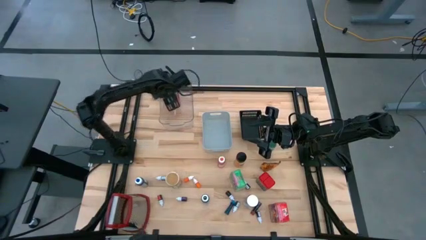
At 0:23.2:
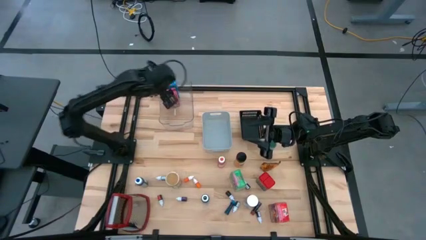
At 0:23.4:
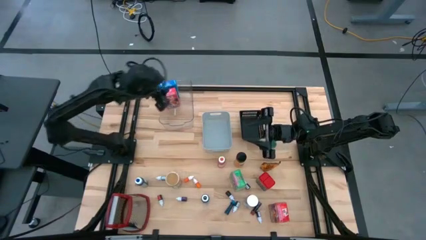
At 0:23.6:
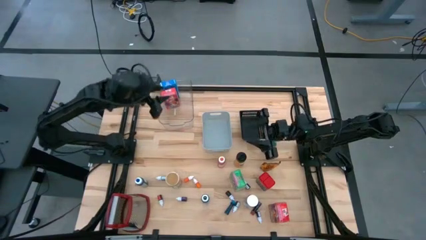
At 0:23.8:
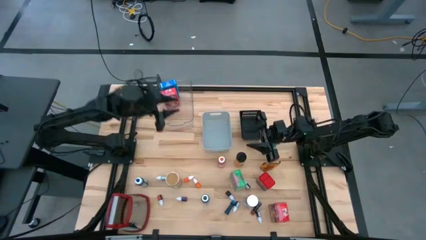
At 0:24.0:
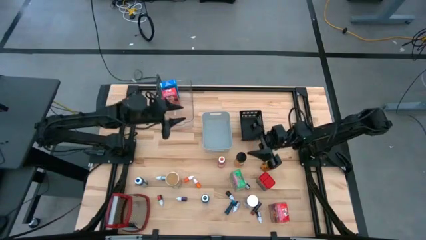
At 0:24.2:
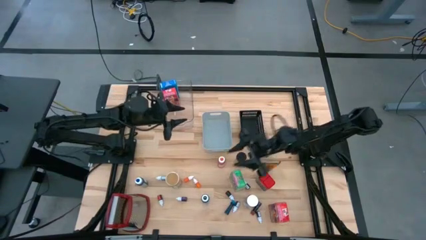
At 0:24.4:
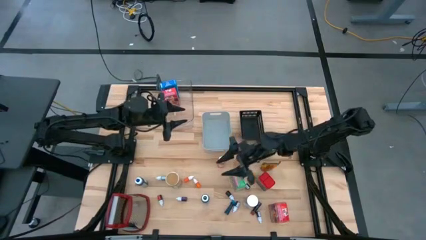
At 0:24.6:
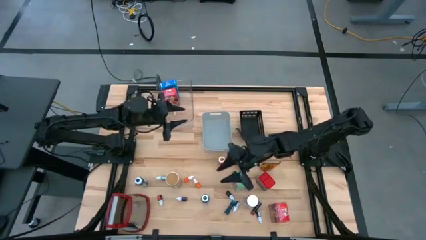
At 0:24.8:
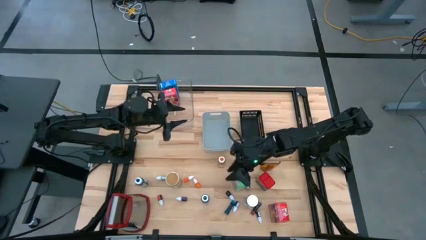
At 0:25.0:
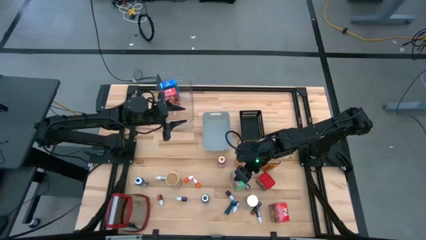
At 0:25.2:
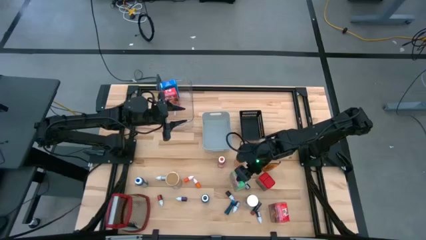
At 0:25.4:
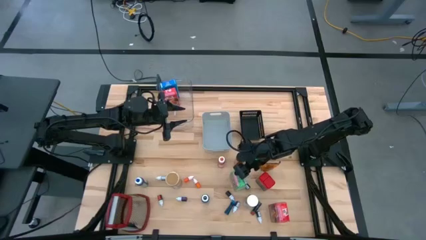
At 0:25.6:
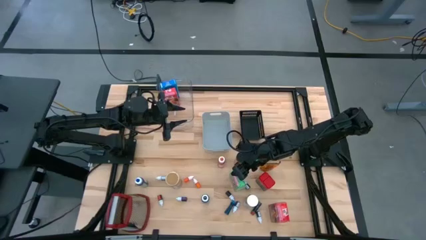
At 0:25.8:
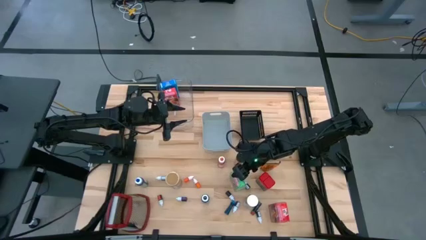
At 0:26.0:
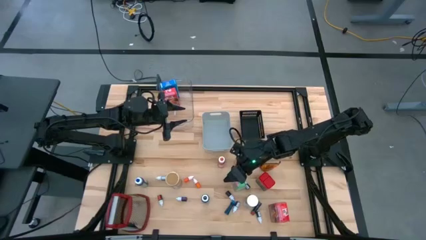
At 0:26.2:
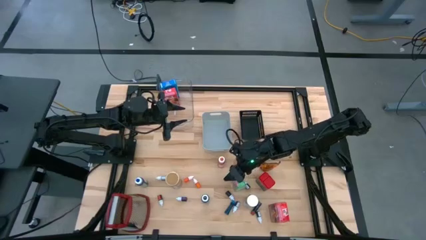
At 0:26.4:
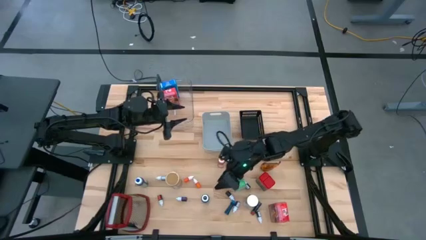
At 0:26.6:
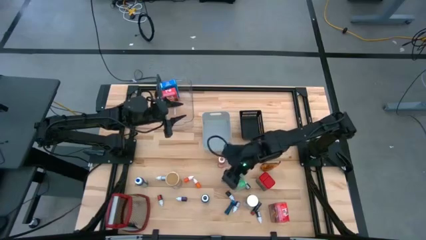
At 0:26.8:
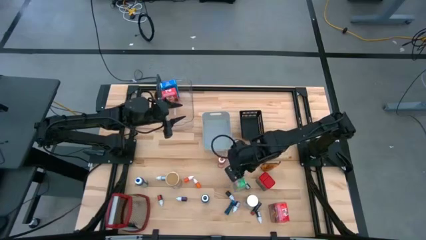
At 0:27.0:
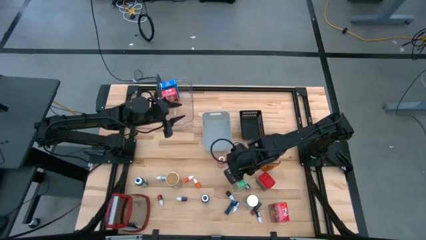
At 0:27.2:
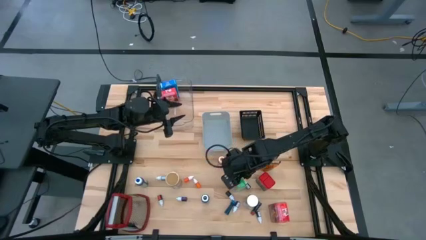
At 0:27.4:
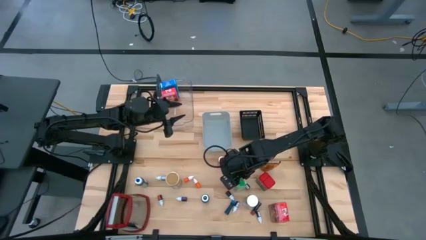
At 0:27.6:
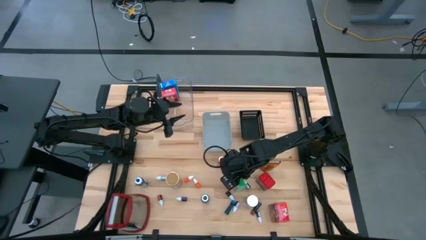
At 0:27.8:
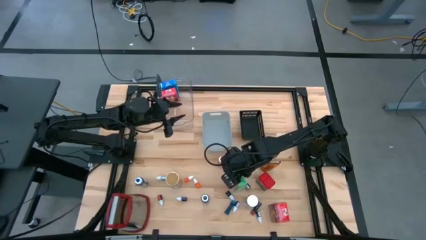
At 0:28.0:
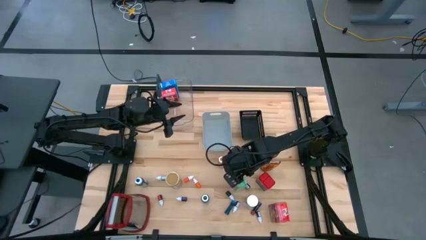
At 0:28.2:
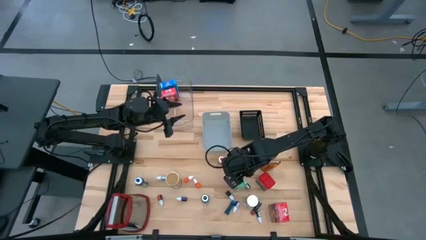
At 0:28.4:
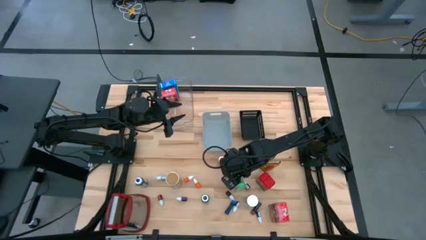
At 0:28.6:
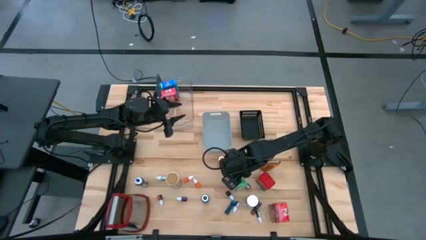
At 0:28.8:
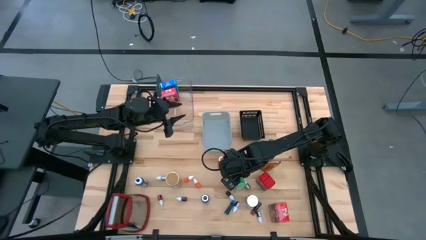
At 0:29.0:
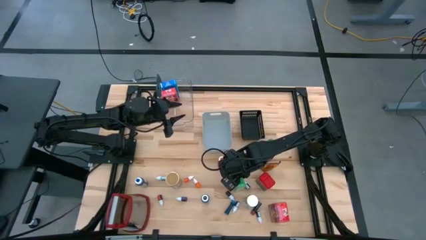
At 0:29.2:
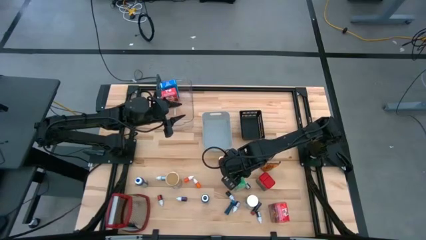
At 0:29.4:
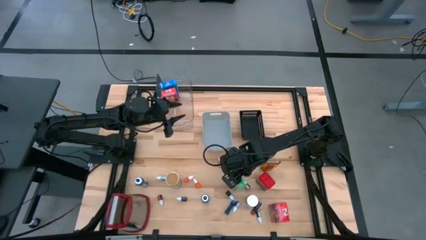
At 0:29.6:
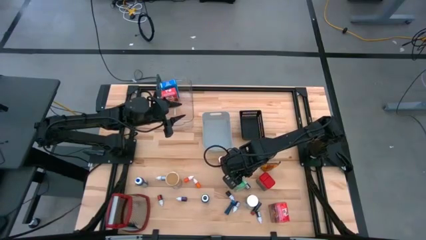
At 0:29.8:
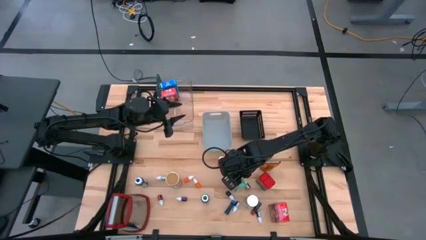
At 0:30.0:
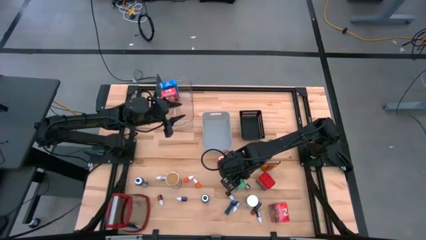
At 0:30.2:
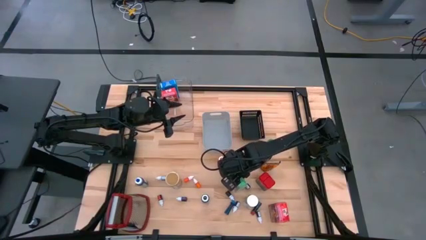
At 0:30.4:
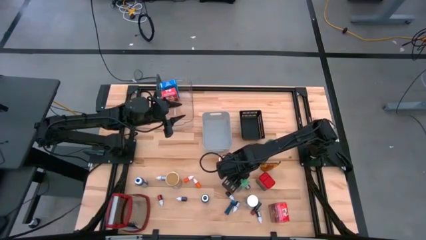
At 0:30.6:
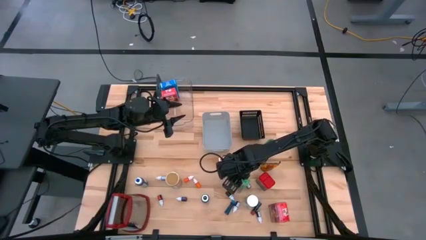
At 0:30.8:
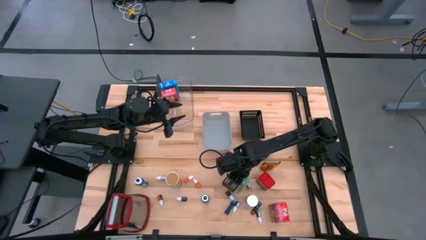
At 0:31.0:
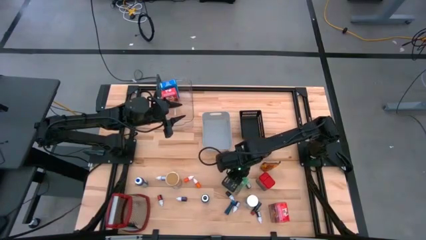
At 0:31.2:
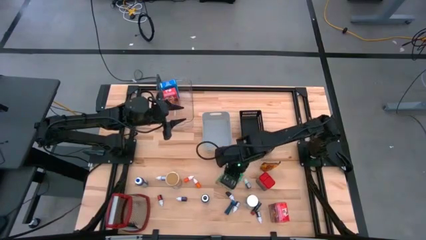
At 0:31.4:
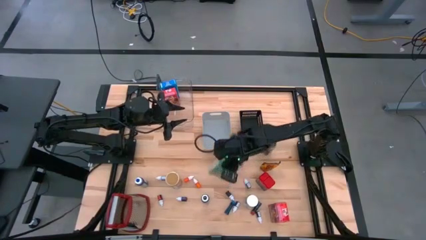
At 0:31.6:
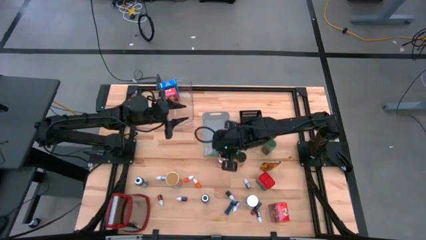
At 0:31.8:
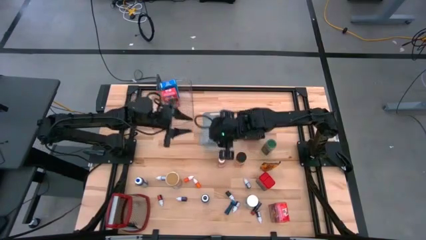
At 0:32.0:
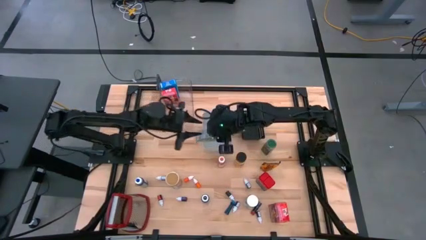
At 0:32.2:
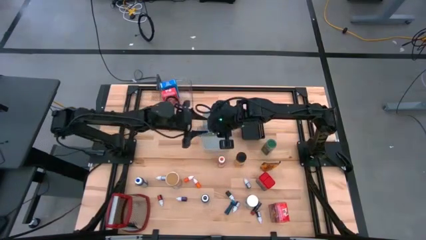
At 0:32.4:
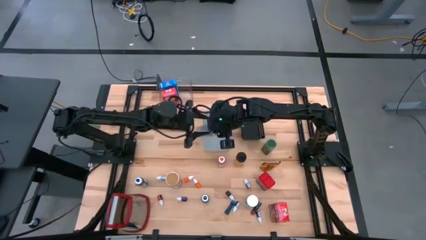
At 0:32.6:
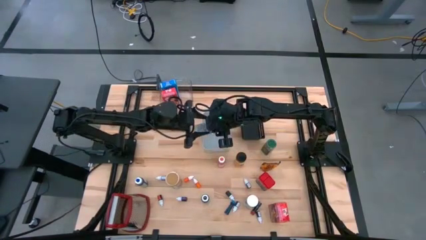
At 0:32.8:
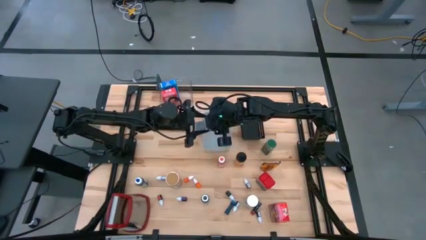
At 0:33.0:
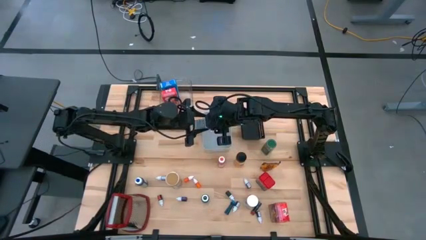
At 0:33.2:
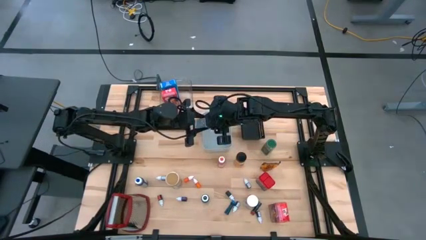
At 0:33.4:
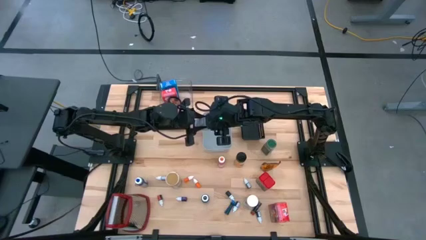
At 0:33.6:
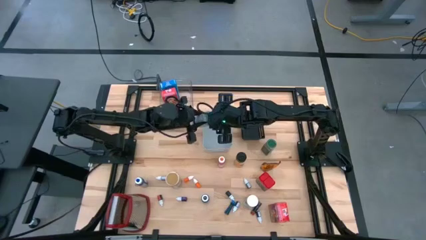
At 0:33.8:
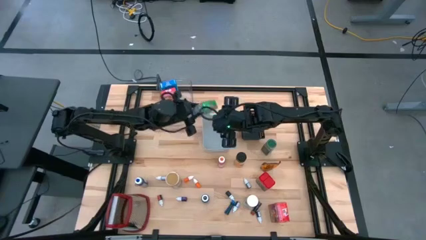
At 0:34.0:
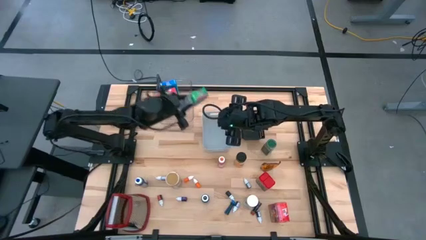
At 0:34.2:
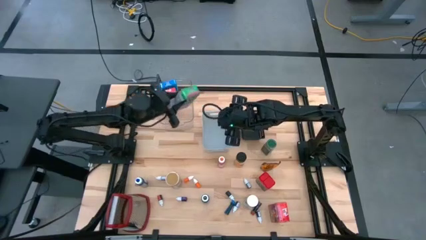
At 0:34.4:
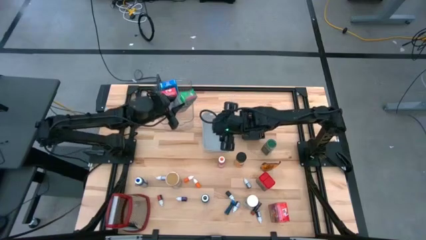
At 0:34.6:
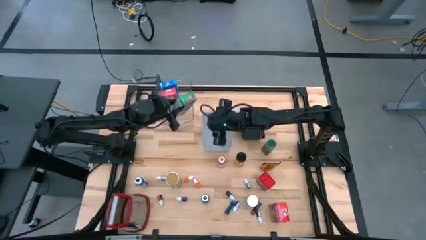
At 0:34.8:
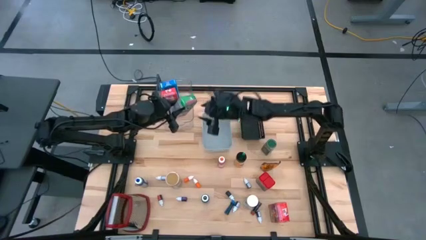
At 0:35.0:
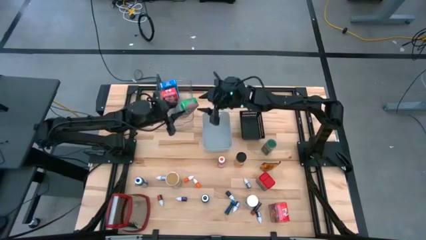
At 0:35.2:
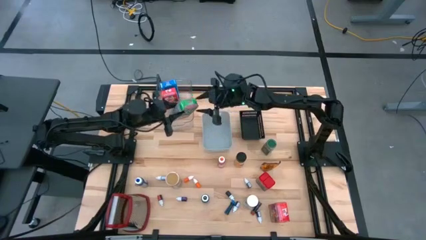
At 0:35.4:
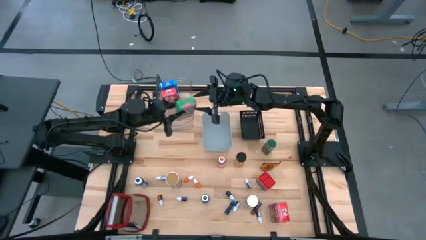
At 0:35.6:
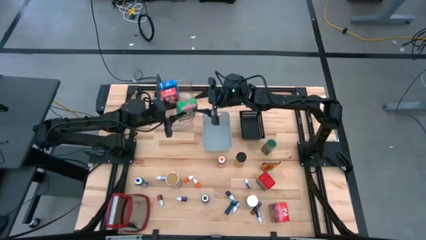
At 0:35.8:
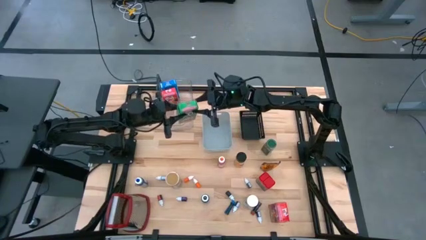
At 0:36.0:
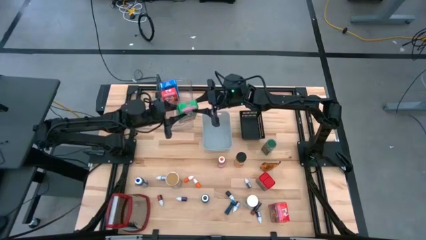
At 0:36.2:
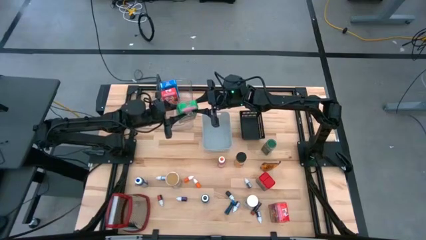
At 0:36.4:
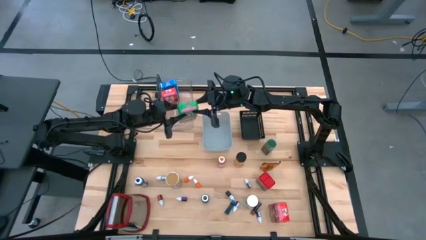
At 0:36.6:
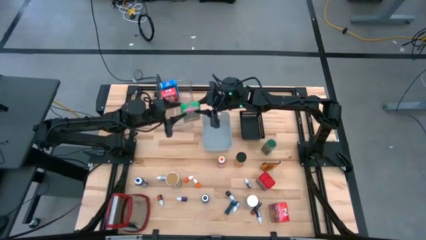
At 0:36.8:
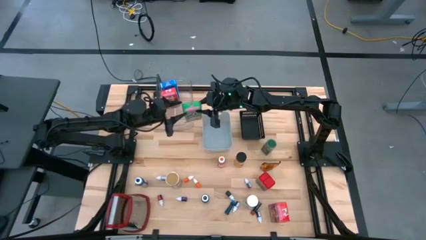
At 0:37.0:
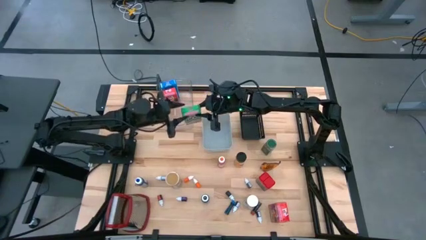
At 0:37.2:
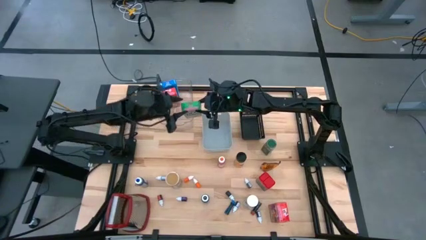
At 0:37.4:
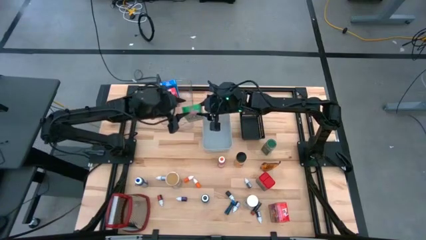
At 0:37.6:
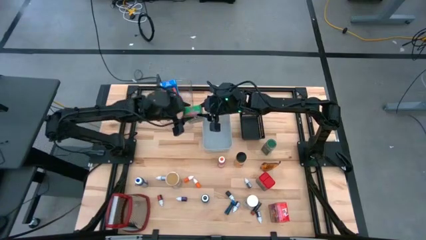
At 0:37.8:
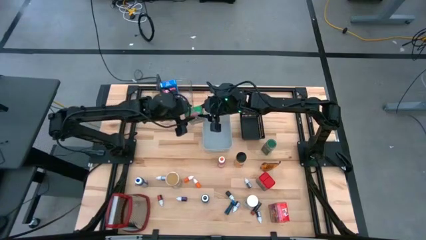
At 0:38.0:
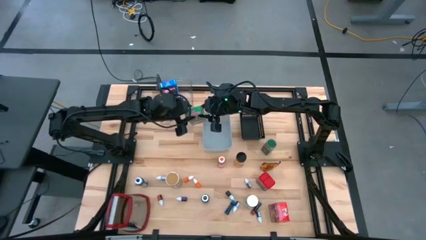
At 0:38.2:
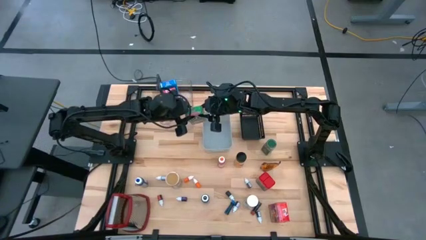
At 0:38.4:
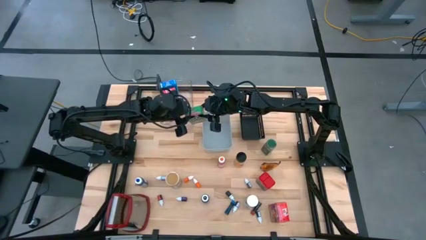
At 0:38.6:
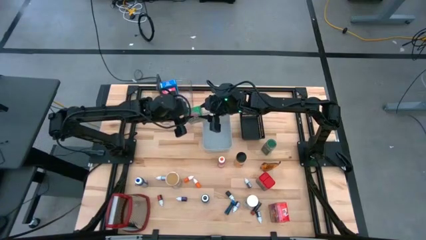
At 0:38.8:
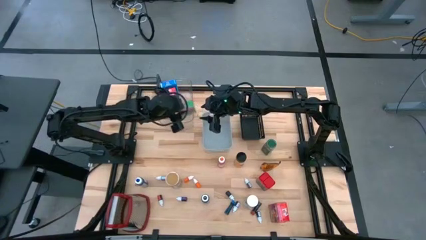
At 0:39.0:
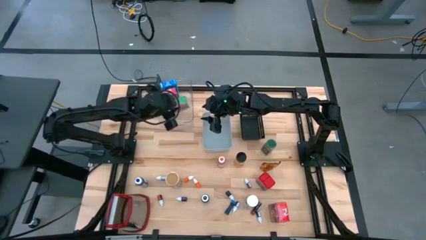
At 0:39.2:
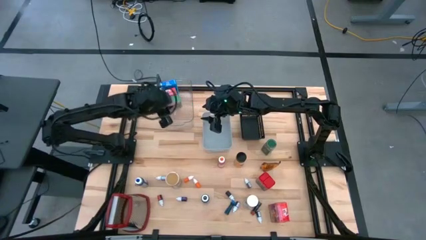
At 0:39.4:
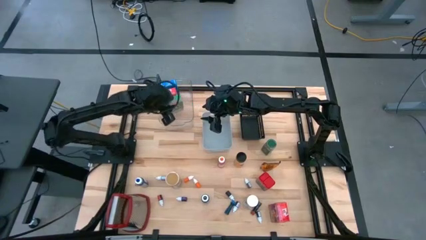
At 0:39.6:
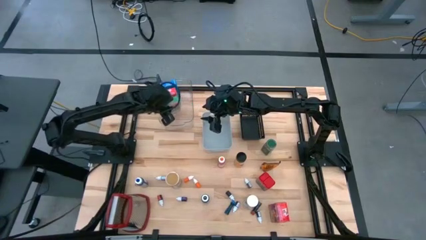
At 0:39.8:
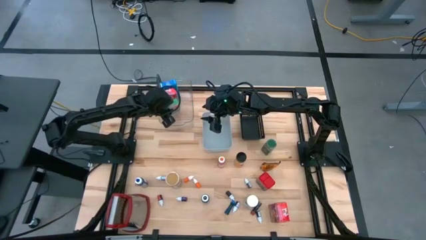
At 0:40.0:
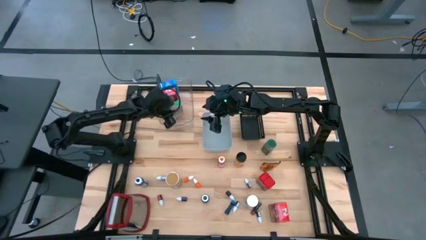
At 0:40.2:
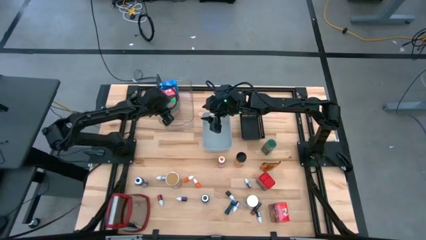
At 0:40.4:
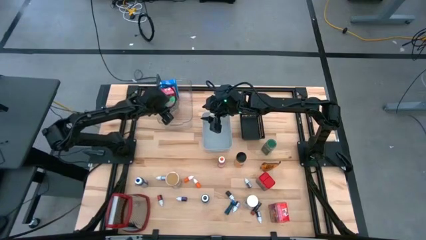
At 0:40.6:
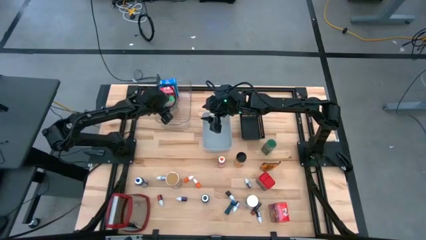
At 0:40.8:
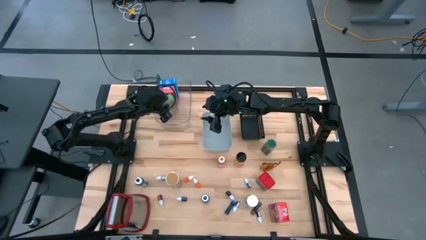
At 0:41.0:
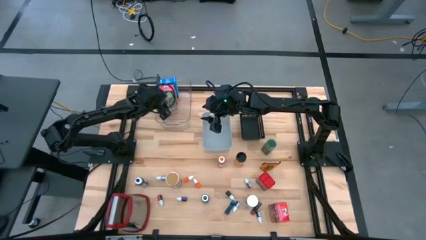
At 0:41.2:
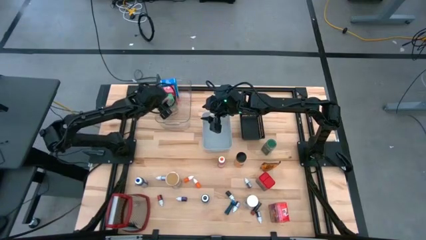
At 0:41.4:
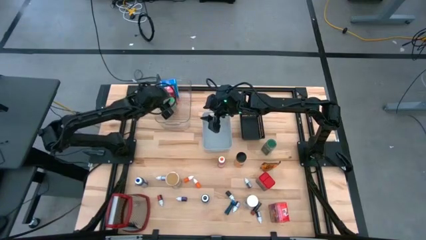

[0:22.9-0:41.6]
Task: Pick & Place Kitchen Items
Put the green cereal box into the transparent bin
